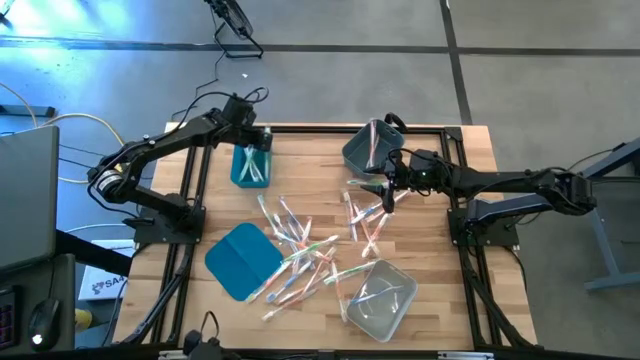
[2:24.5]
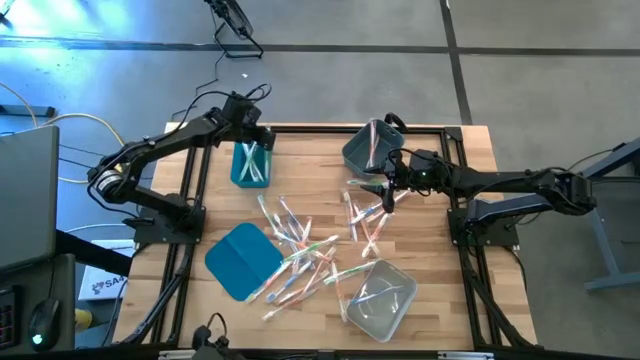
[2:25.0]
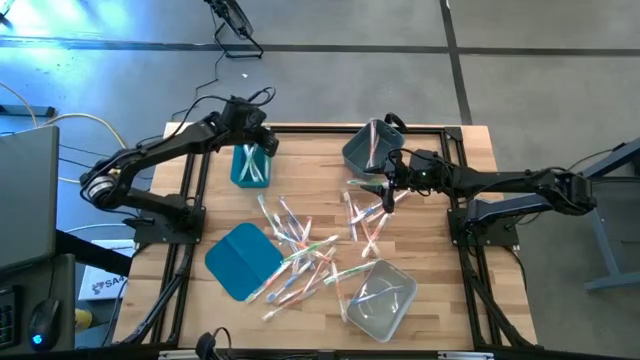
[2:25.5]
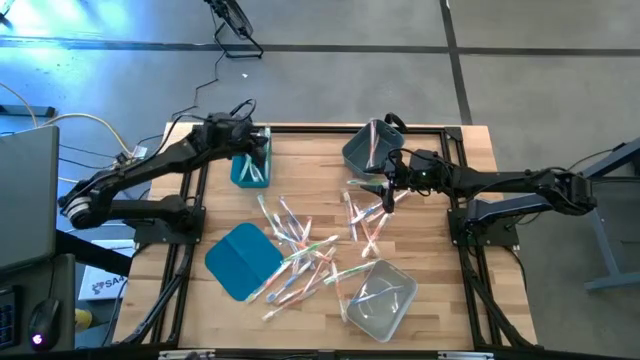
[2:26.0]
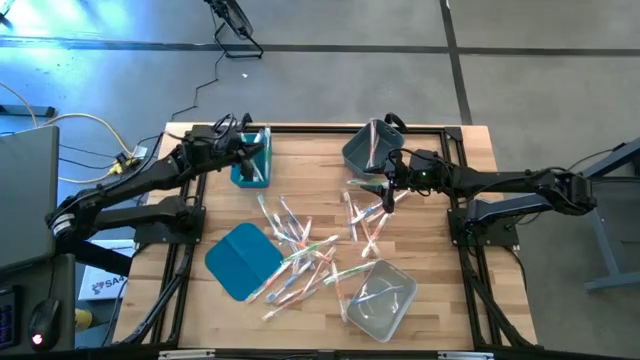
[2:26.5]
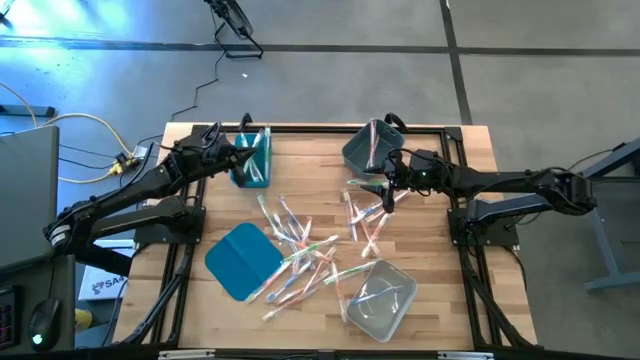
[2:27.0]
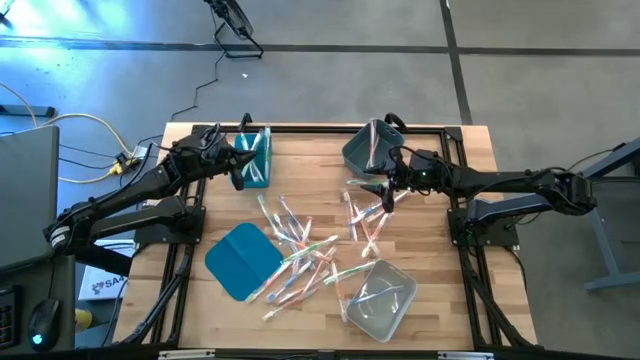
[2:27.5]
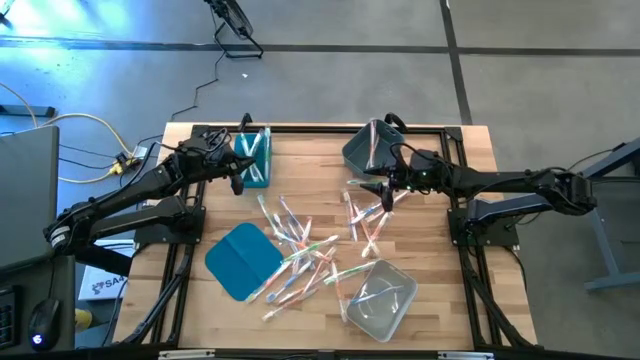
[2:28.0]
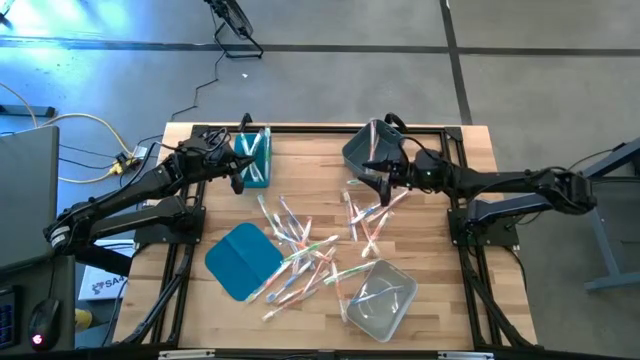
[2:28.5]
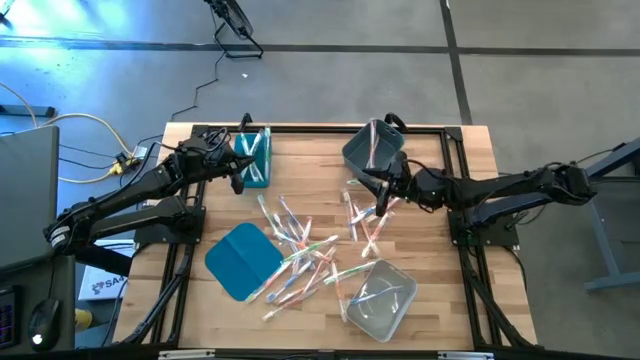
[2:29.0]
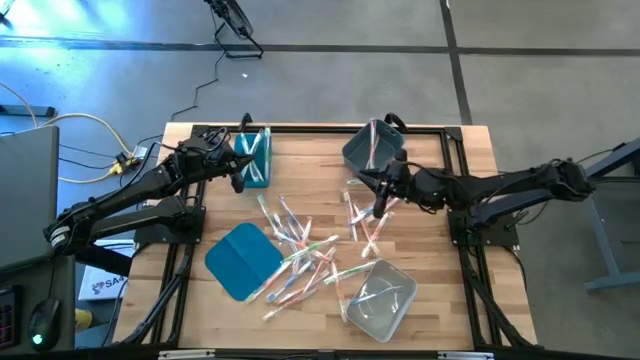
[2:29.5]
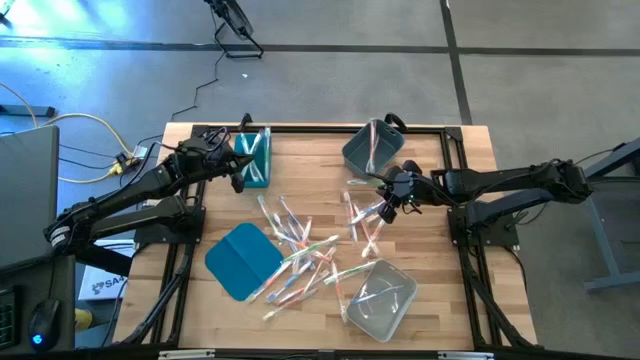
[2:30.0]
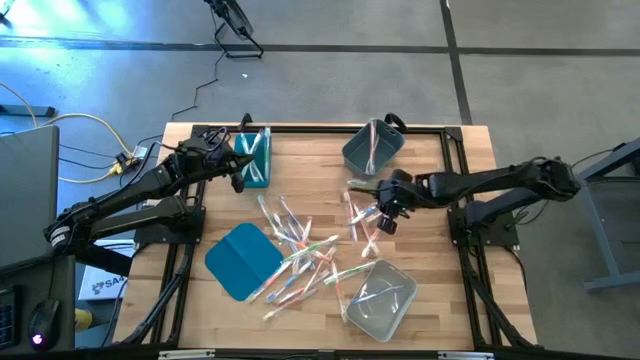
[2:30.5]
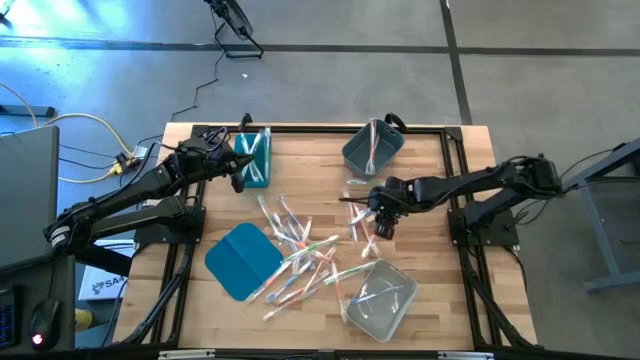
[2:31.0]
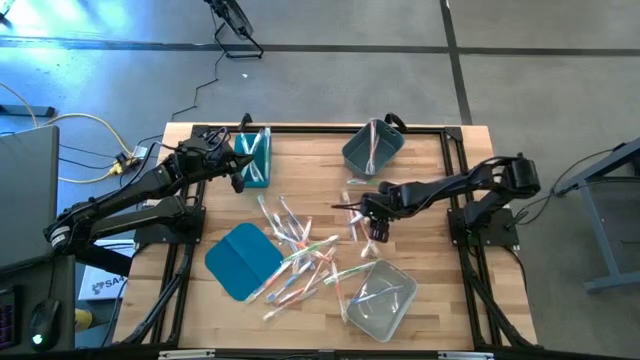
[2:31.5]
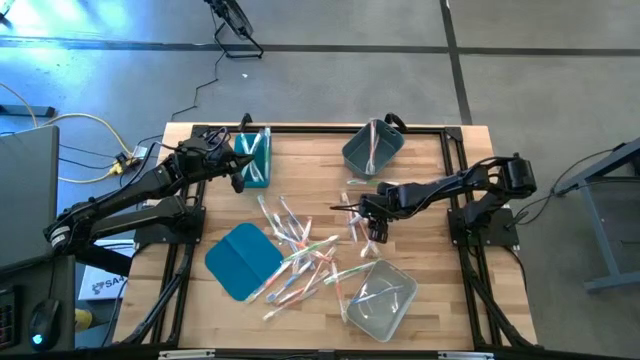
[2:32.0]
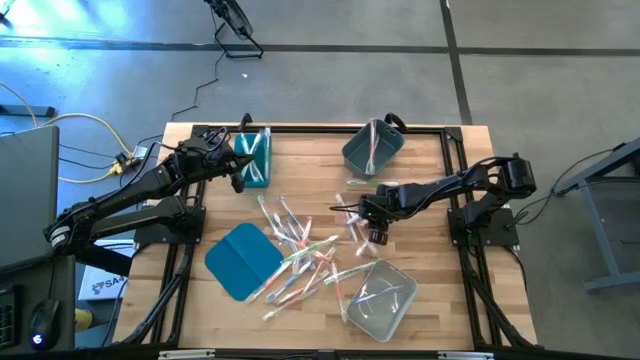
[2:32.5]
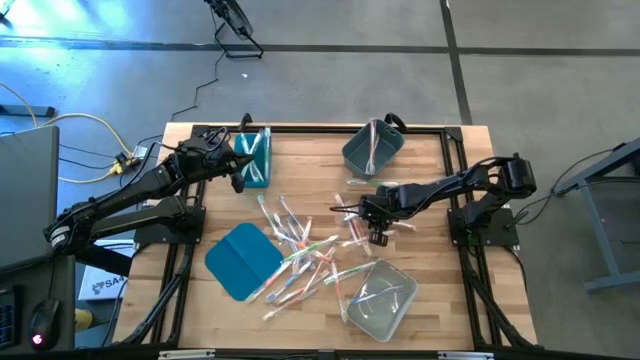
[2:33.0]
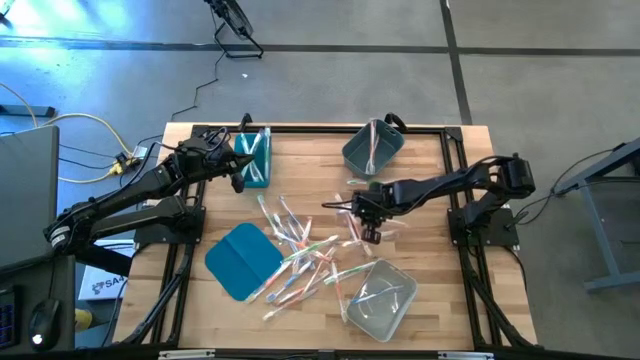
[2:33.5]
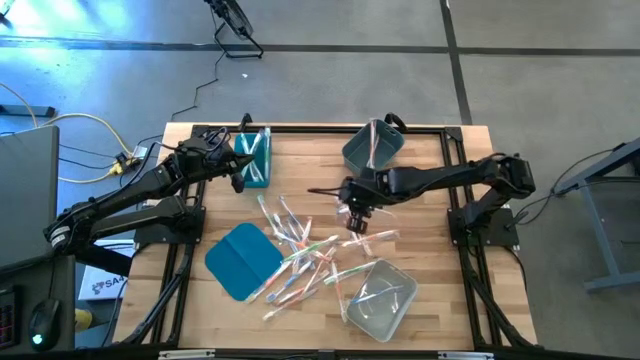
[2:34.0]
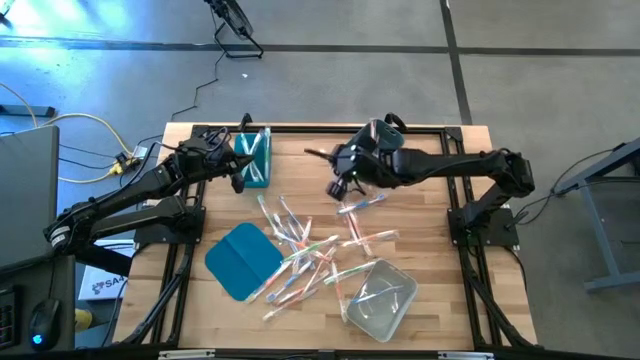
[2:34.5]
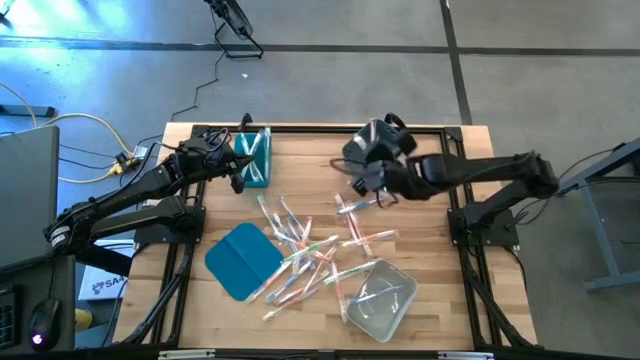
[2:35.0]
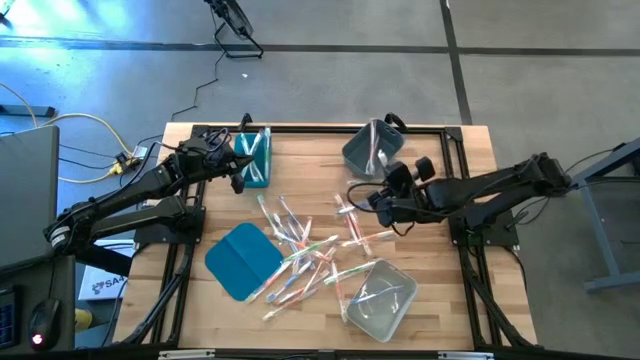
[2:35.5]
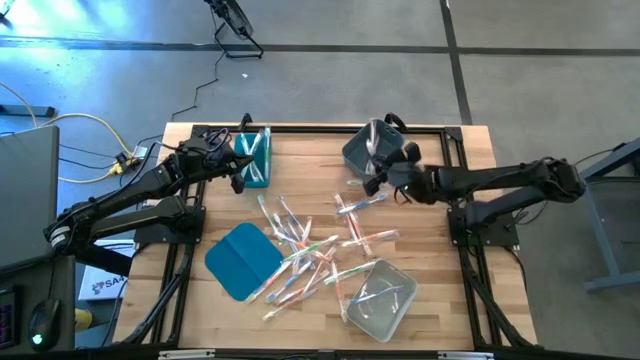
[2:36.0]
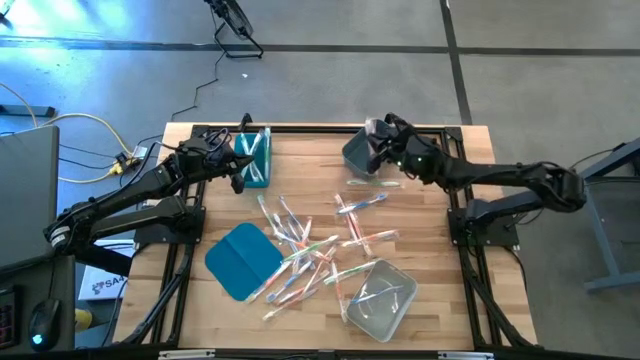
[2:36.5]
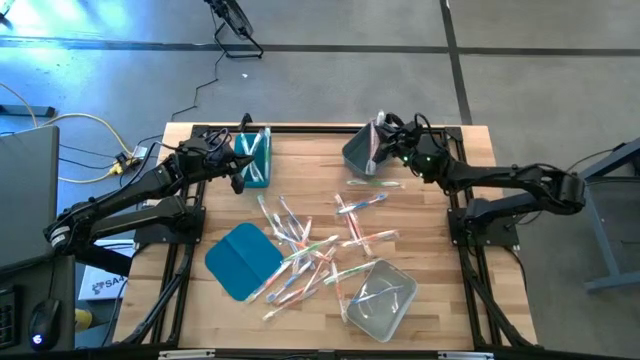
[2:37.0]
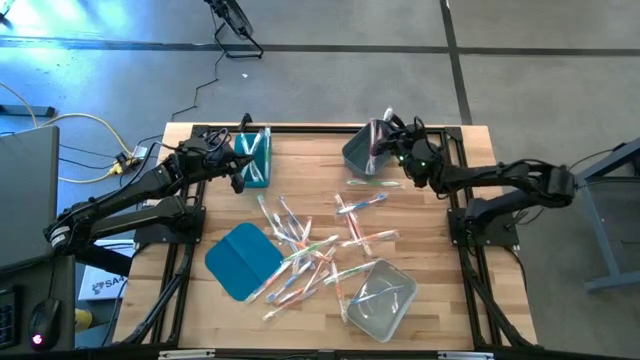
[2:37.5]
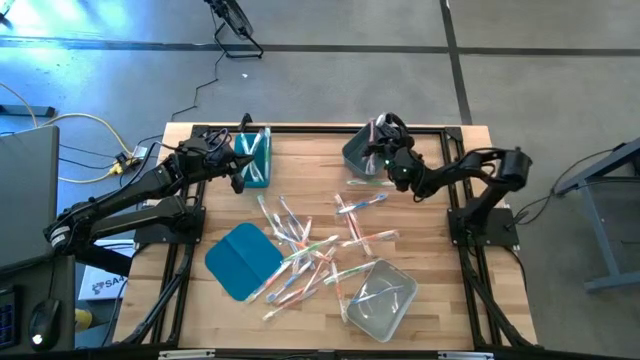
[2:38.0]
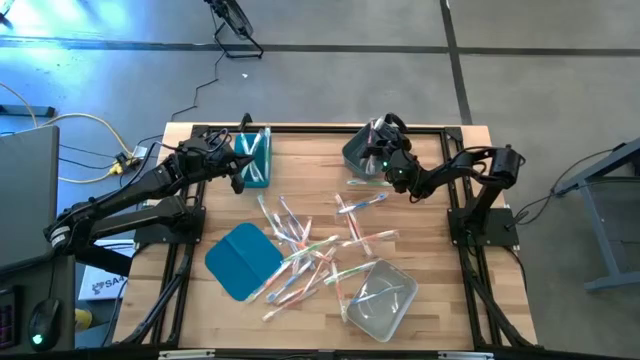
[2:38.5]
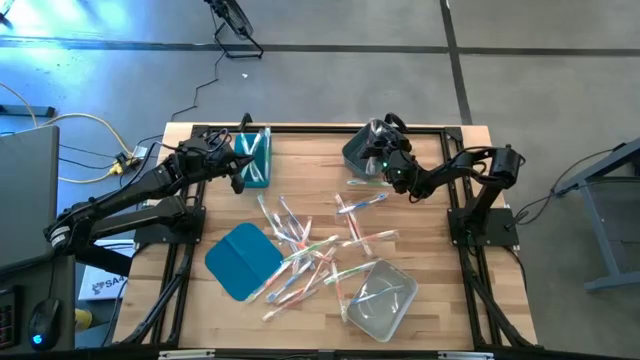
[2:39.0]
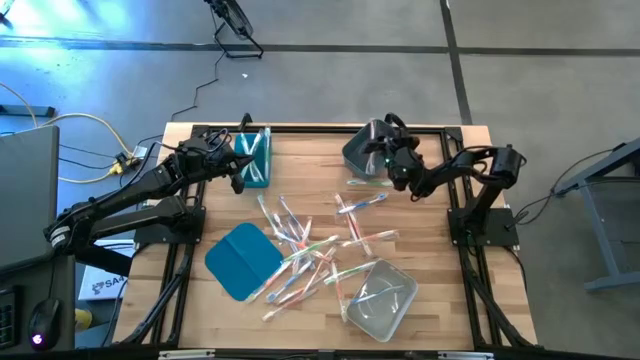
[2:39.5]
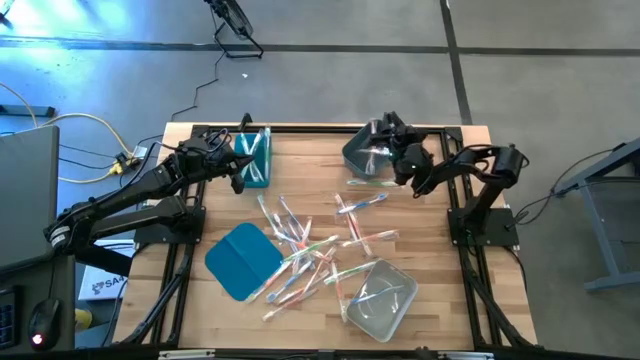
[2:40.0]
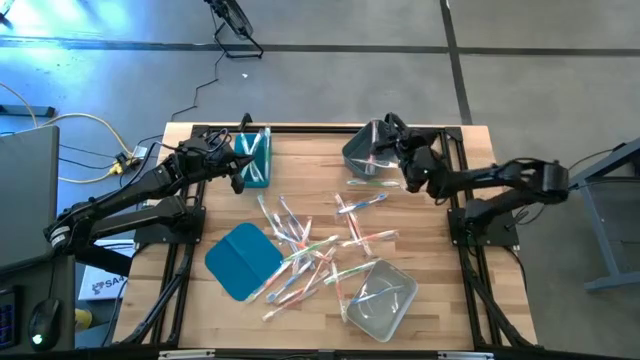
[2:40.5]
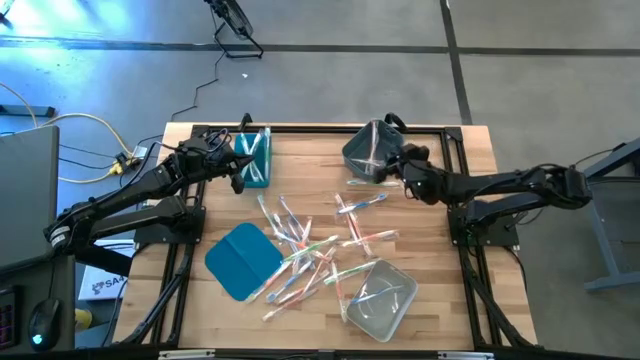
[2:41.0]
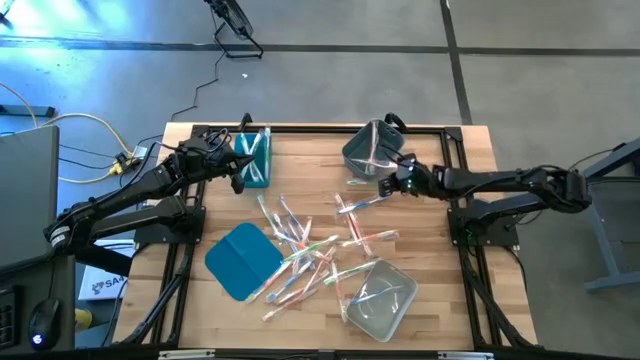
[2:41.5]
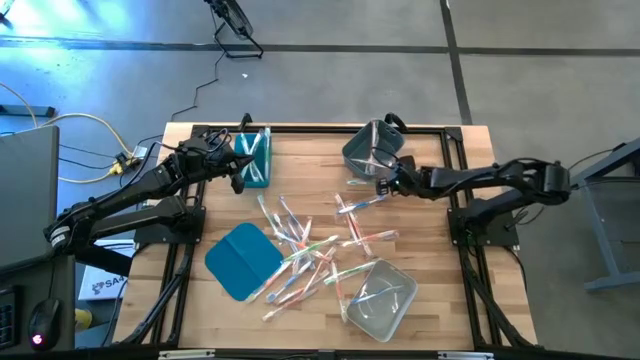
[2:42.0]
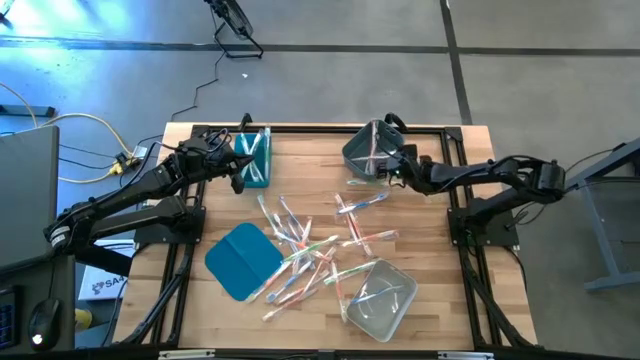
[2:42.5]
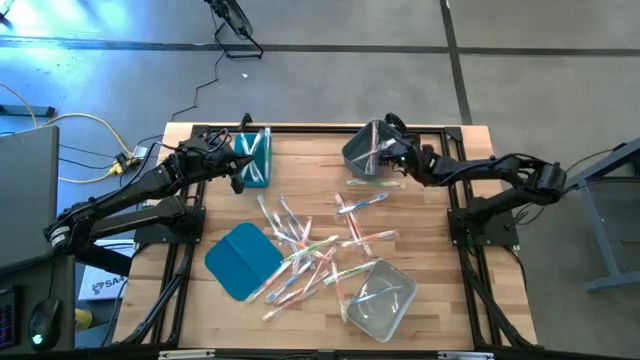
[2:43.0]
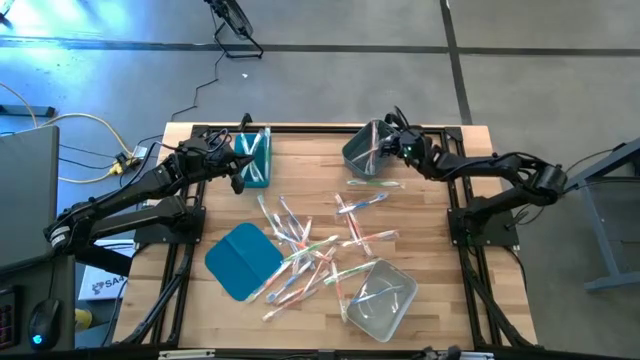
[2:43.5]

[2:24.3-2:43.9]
Task: Pick & Place Toothbrushes
Put the orange toothbrush into the dark gray bin
